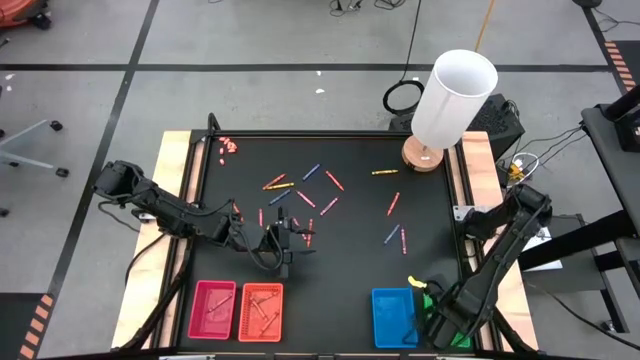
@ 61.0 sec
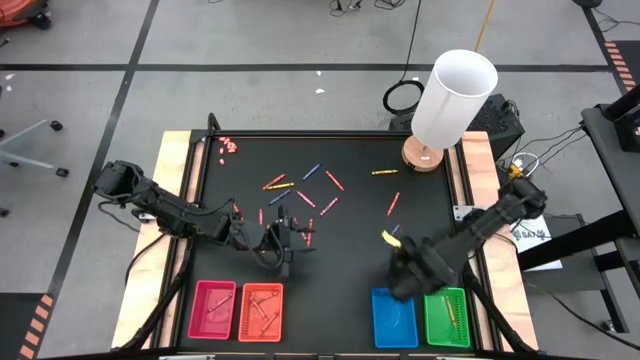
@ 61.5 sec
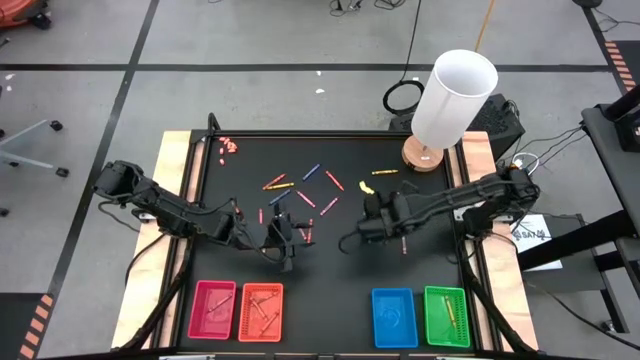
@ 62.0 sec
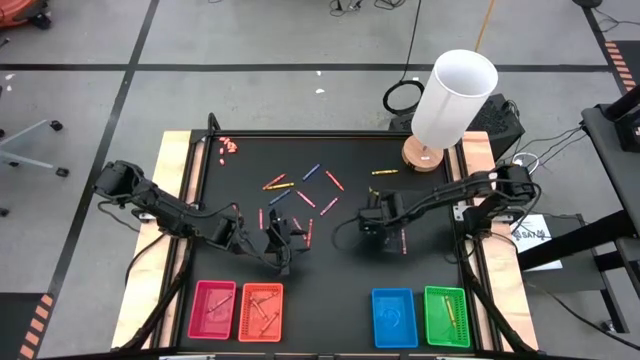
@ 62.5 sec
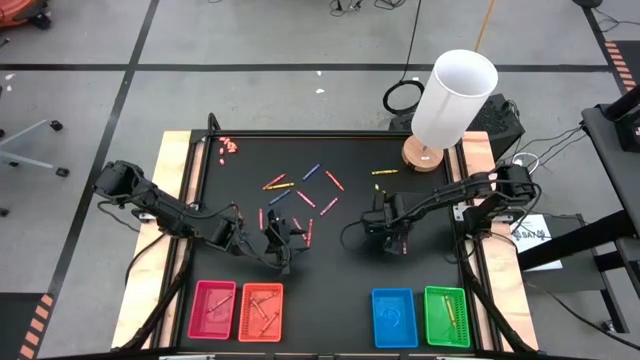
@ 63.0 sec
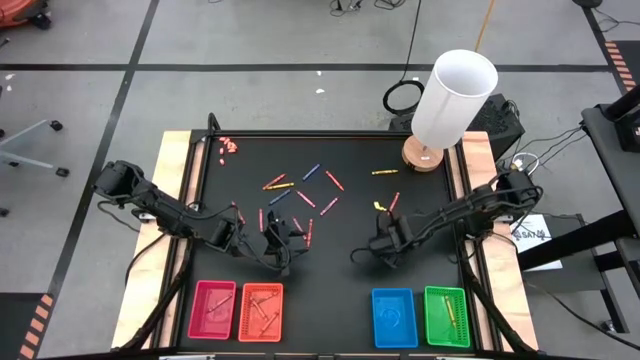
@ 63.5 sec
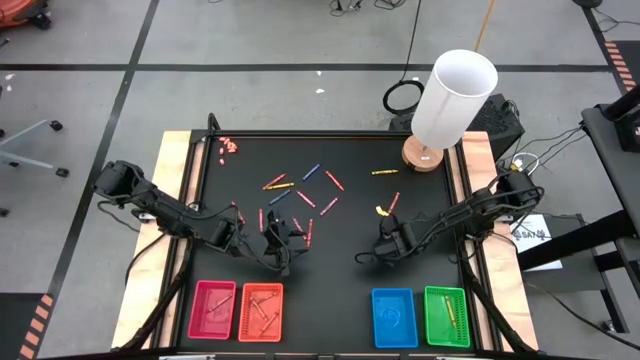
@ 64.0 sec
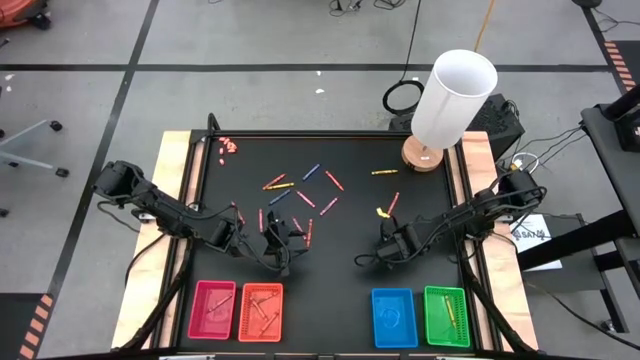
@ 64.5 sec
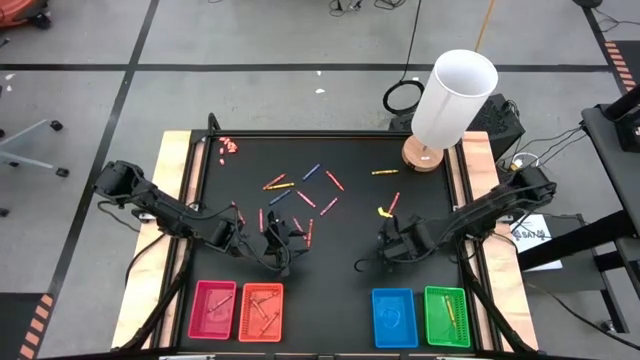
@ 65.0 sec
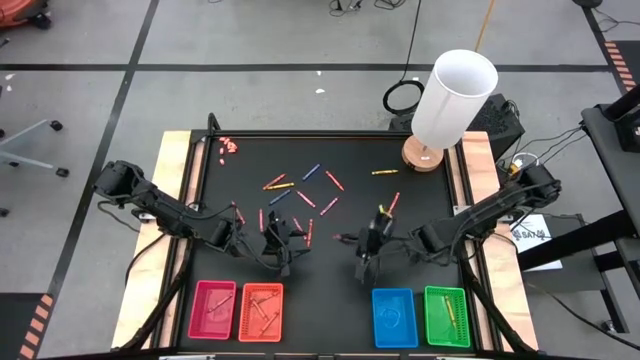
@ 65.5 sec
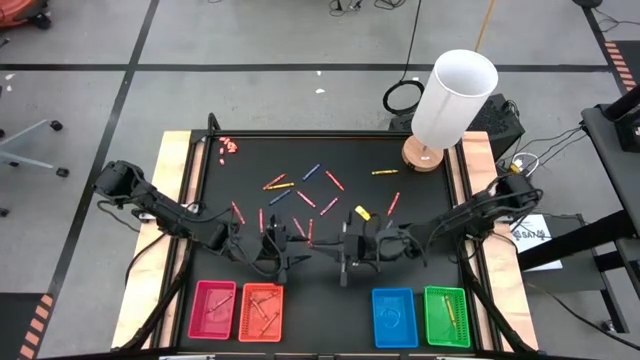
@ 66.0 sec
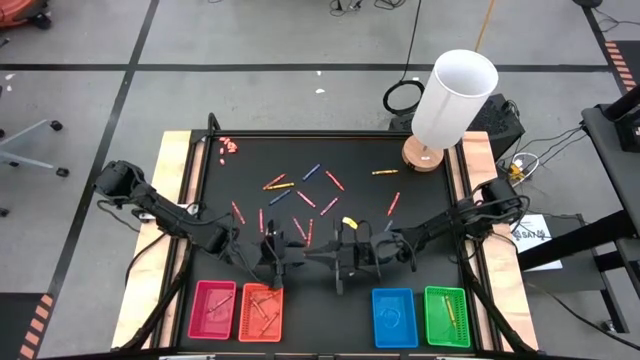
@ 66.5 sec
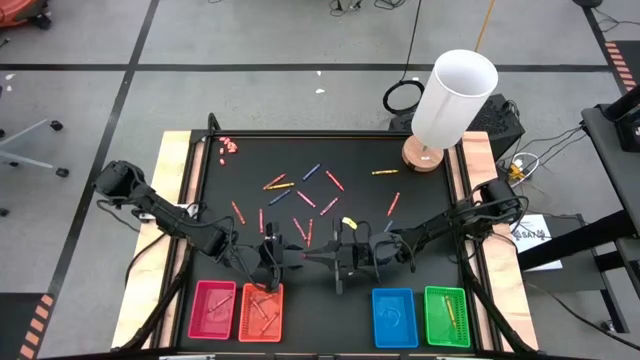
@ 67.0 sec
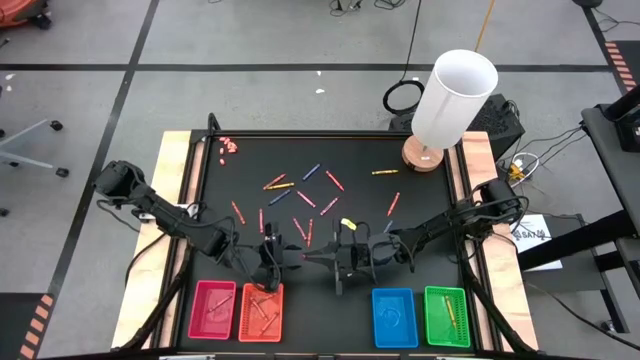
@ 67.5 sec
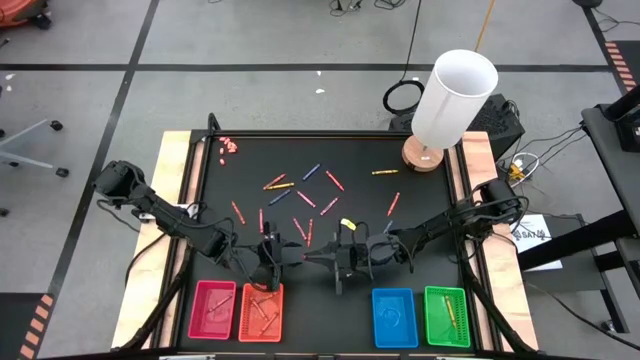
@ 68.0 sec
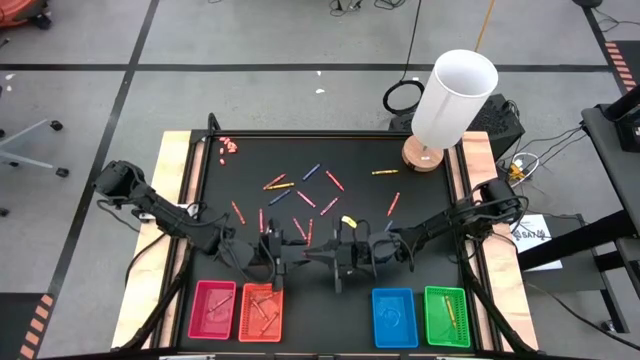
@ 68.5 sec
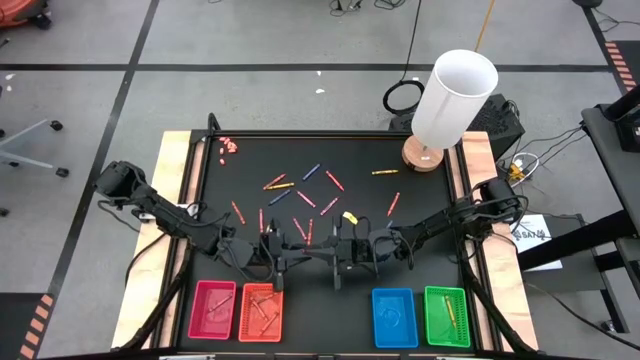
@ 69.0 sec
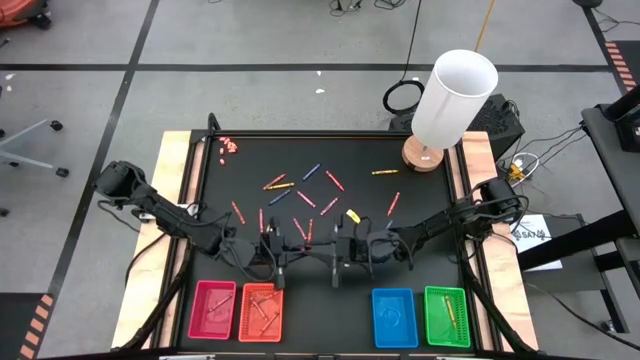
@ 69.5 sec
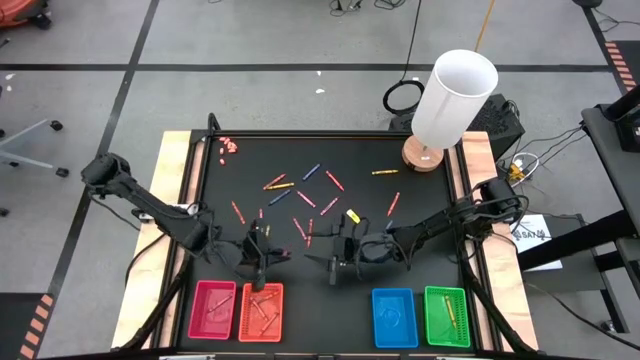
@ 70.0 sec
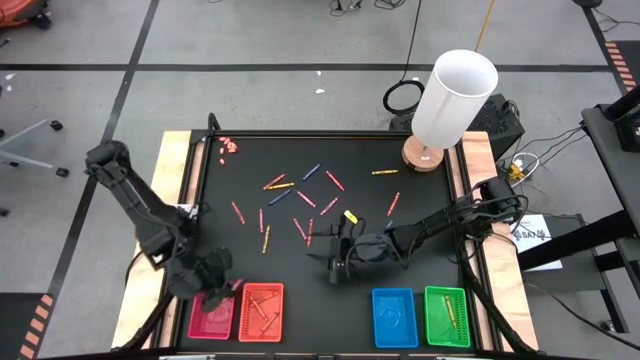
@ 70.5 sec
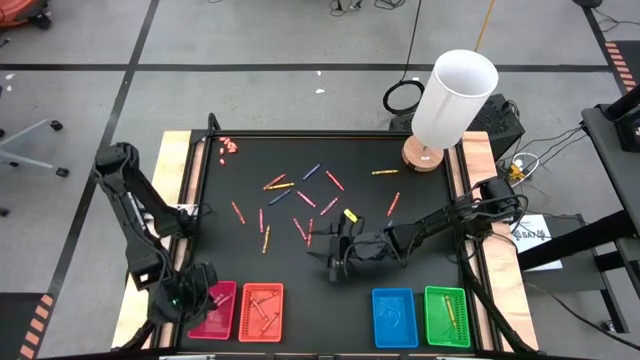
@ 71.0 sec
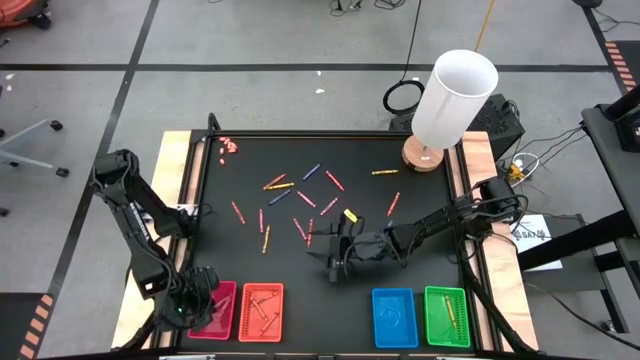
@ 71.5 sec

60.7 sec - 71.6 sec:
Task: Sort crayons
Put the red crayon into the red bin

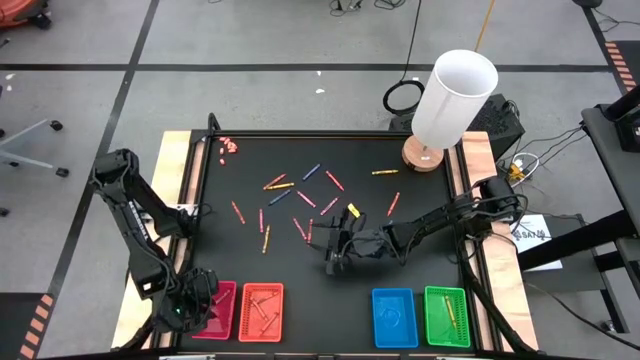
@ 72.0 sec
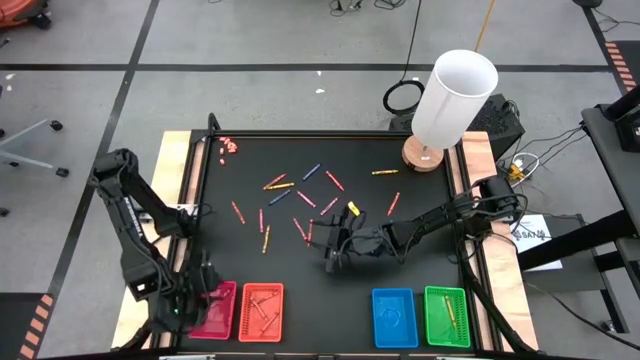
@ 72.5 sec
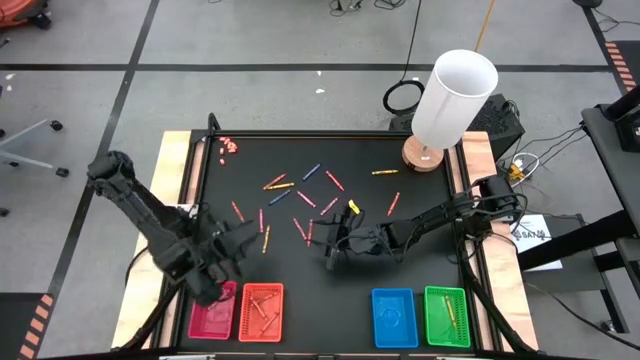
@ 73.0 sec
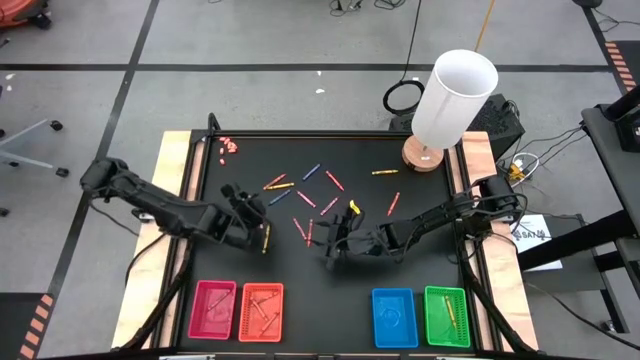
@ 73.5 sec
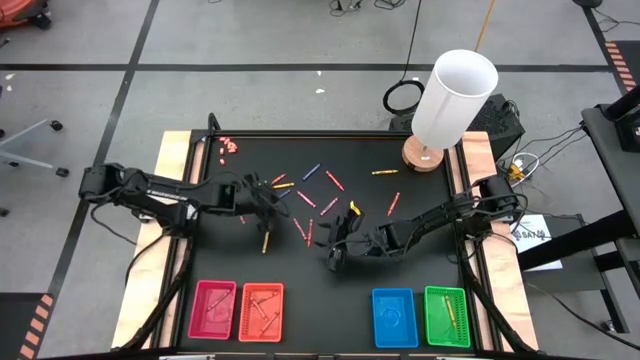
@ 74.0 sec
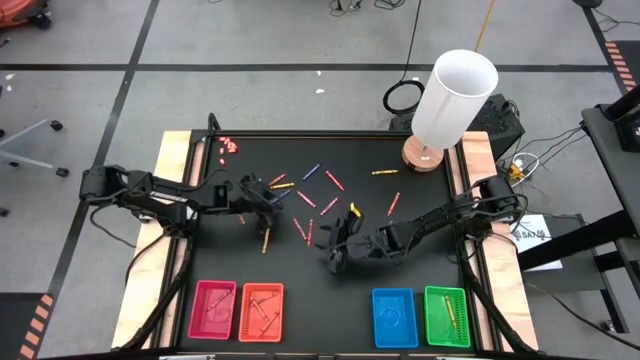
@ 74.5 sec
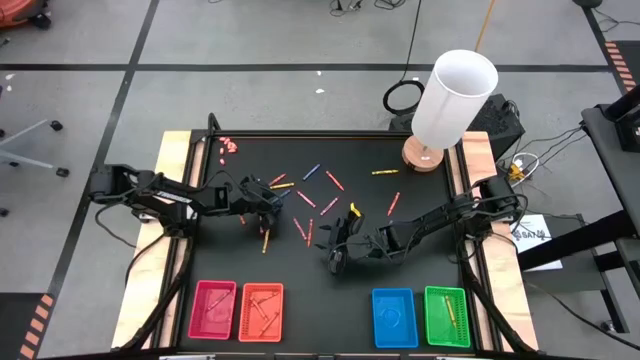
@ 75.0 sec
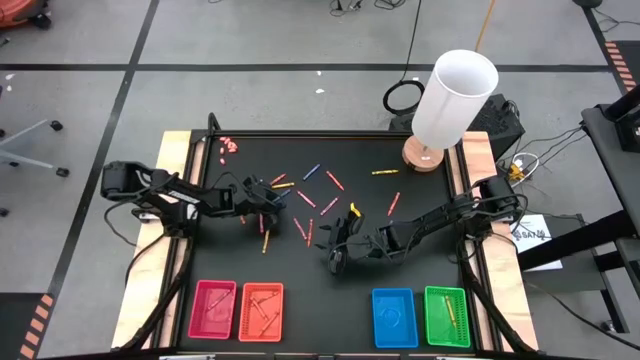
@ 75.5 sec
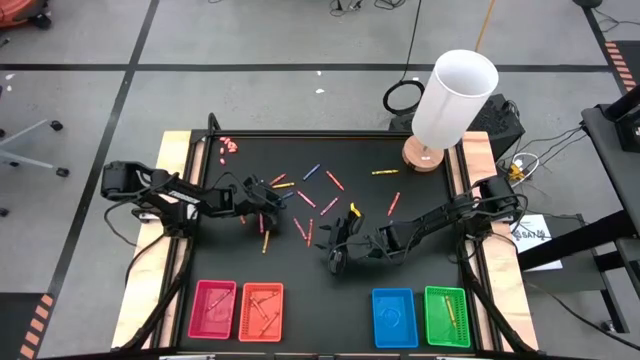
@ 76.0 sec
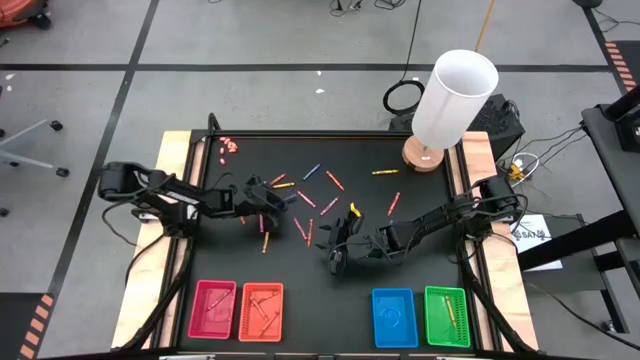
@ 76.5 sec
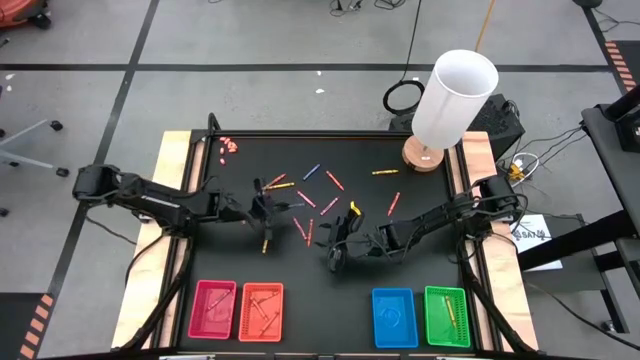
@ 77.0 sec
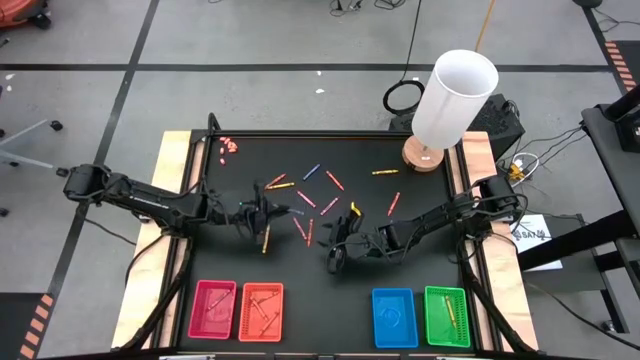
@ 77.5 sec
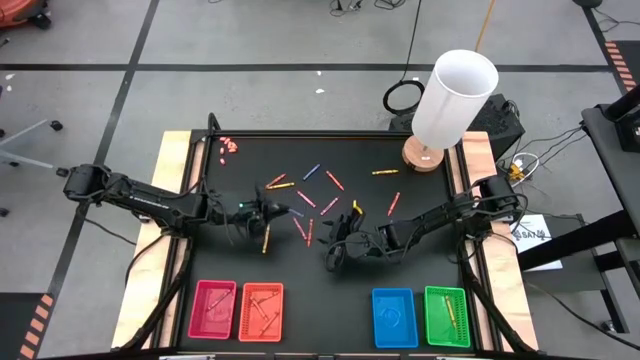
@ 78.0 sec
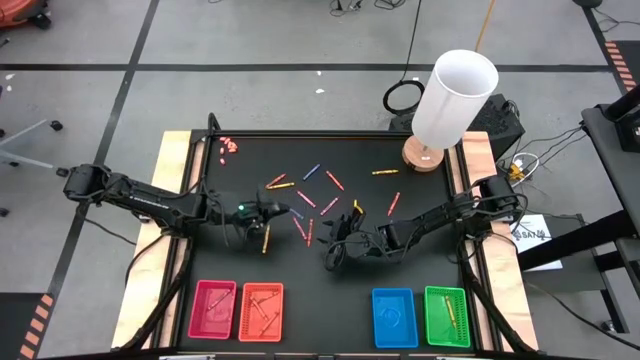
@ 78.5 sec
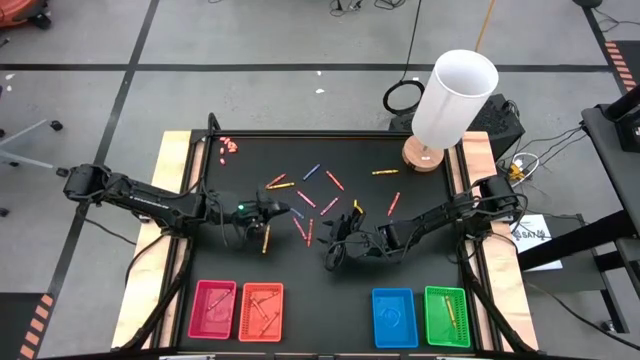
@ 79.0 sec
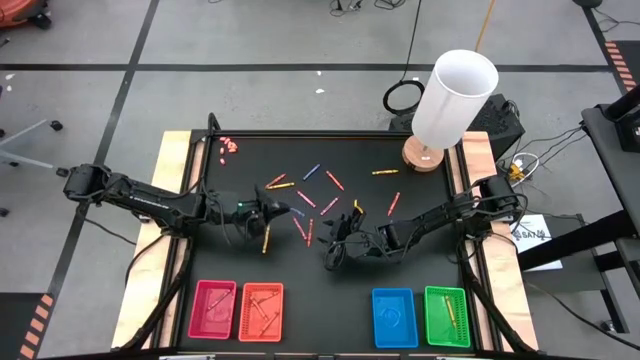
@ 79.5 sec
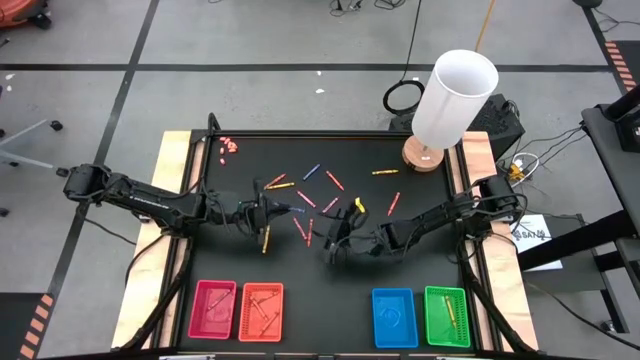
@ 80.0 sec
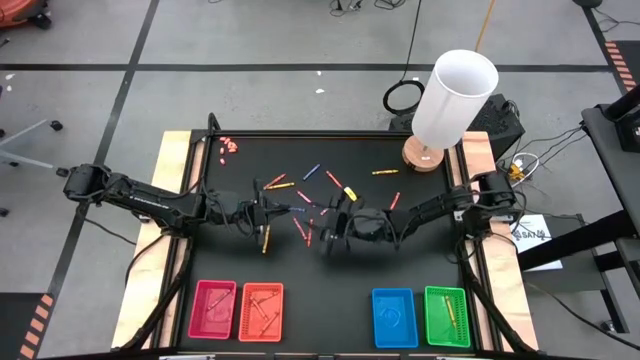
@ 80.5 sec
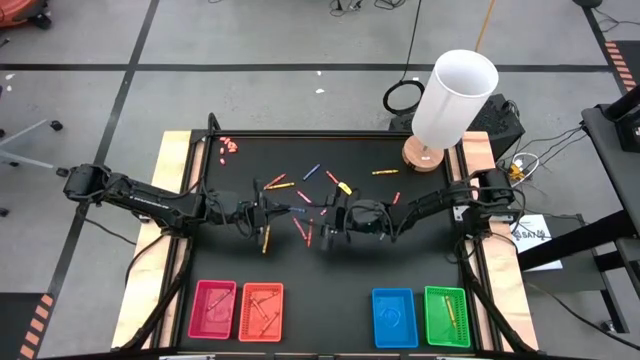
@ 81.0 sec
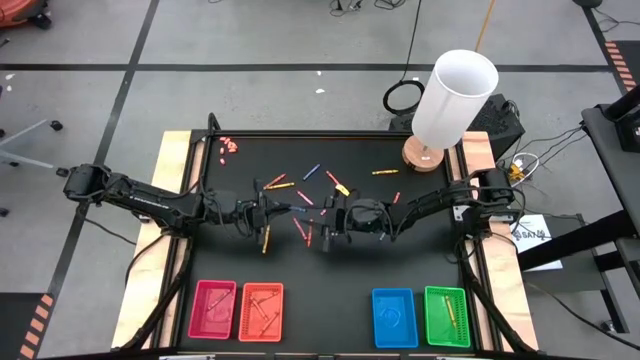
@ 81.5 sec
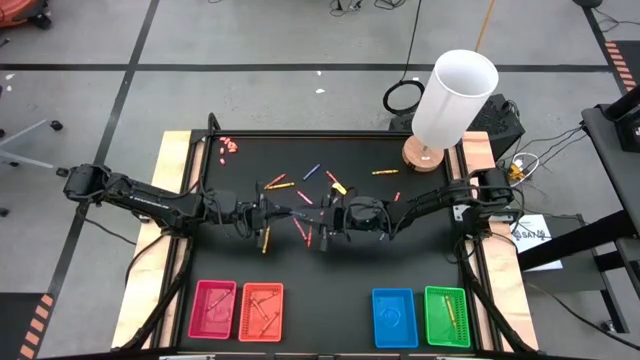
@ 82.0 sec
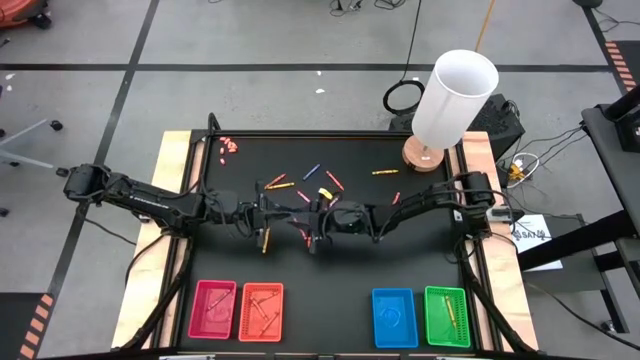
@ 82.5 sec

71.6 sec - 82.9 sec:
Put the blue crayon into the blue bin
